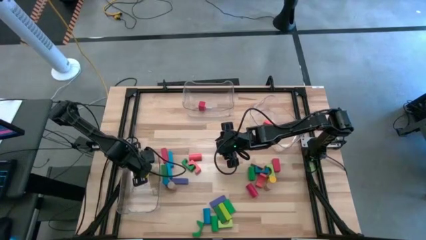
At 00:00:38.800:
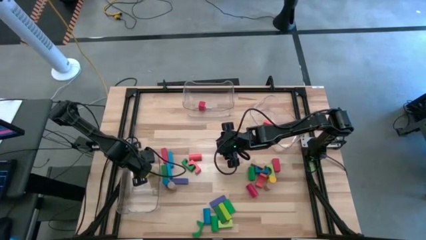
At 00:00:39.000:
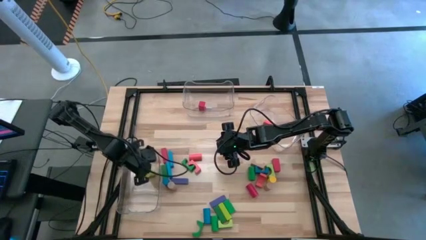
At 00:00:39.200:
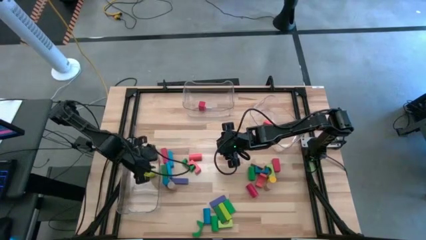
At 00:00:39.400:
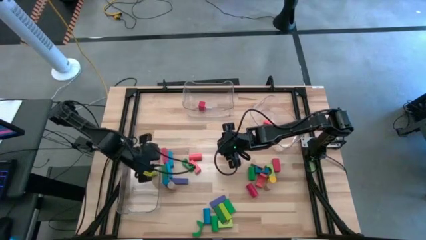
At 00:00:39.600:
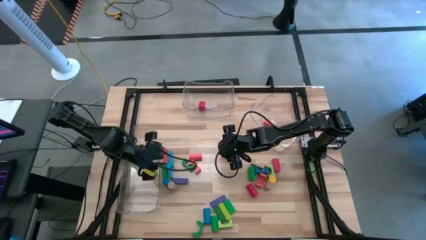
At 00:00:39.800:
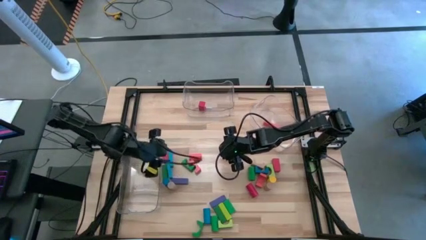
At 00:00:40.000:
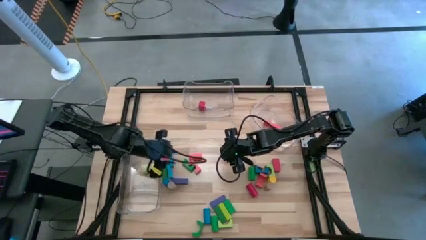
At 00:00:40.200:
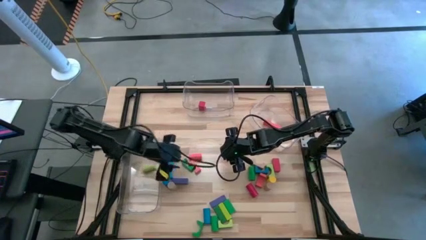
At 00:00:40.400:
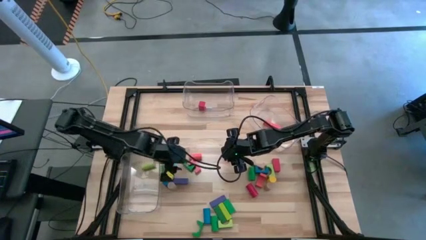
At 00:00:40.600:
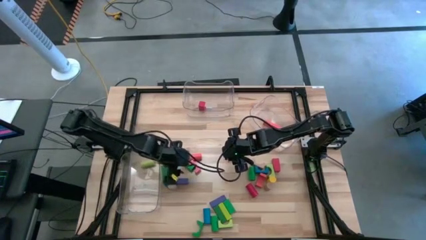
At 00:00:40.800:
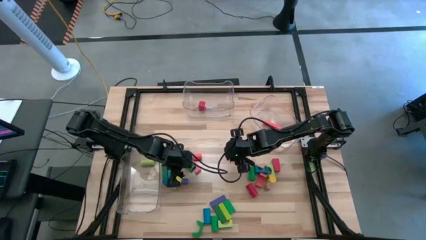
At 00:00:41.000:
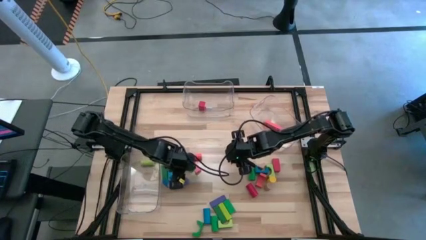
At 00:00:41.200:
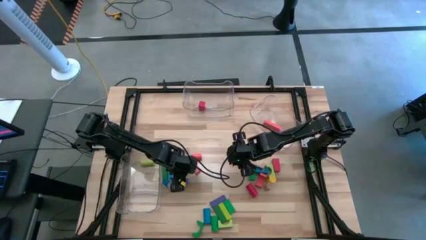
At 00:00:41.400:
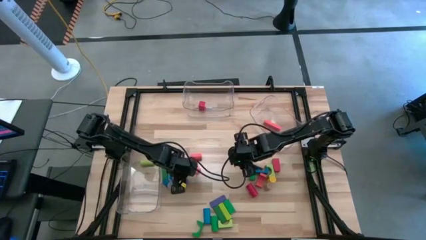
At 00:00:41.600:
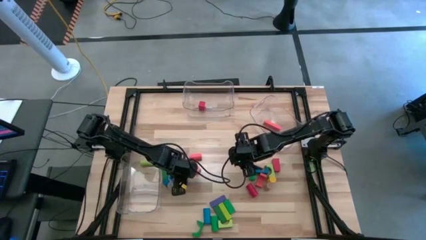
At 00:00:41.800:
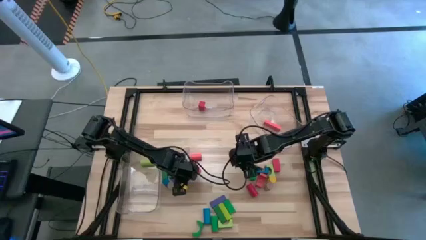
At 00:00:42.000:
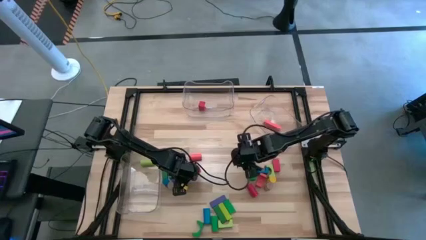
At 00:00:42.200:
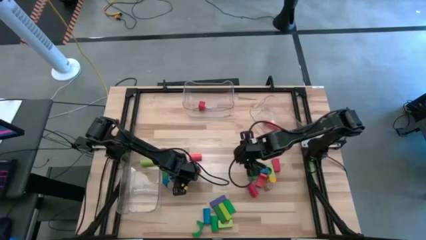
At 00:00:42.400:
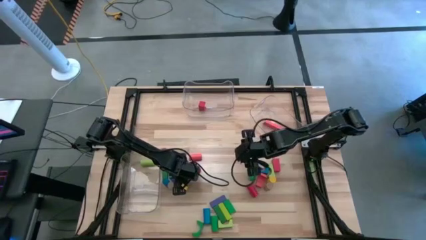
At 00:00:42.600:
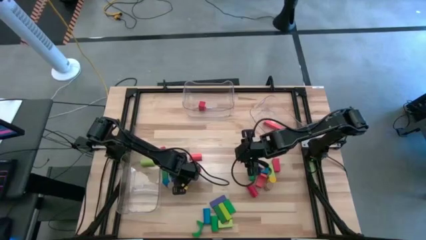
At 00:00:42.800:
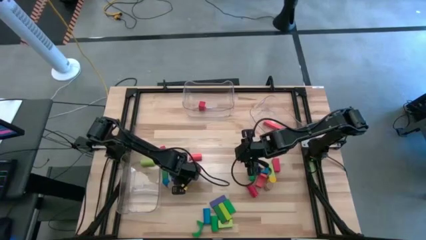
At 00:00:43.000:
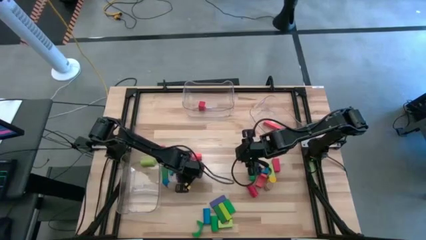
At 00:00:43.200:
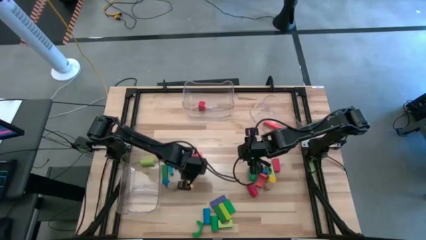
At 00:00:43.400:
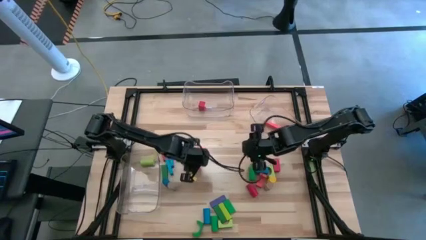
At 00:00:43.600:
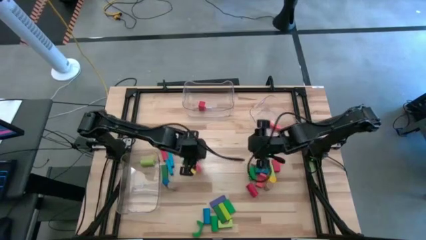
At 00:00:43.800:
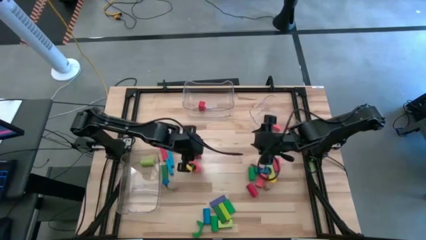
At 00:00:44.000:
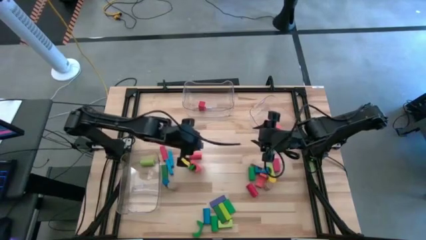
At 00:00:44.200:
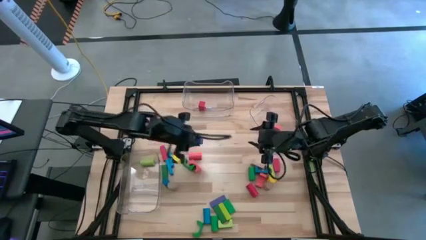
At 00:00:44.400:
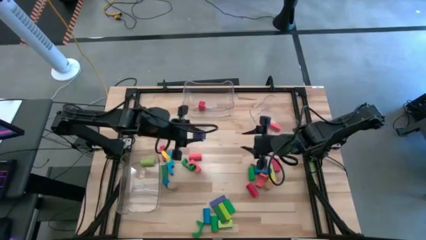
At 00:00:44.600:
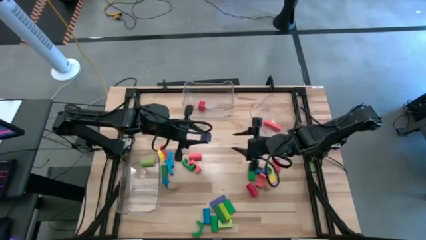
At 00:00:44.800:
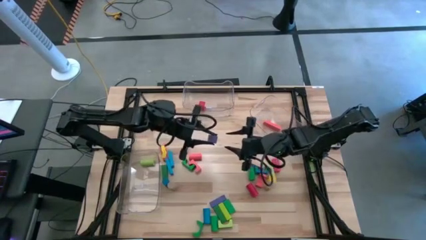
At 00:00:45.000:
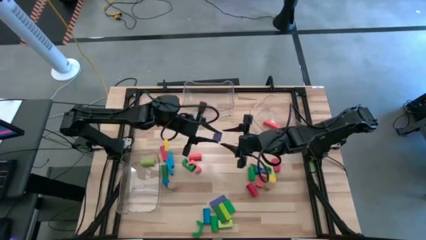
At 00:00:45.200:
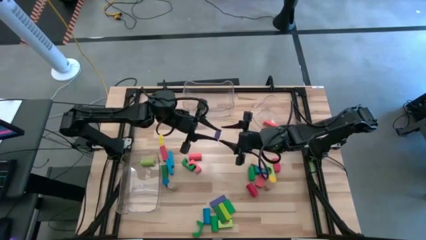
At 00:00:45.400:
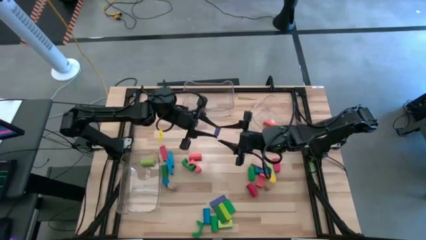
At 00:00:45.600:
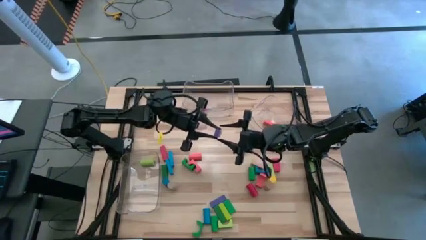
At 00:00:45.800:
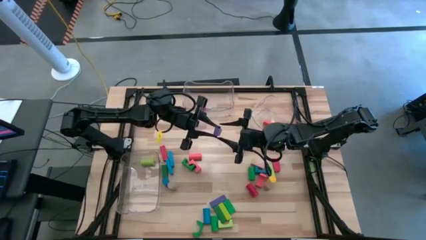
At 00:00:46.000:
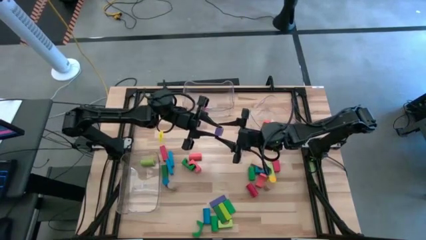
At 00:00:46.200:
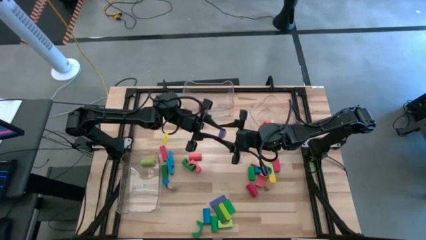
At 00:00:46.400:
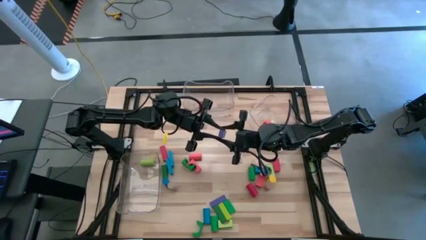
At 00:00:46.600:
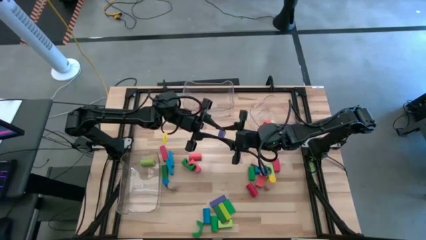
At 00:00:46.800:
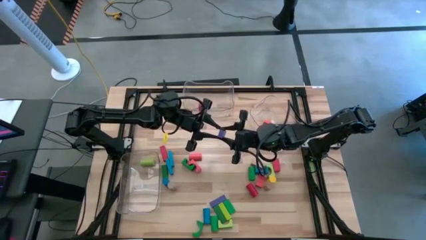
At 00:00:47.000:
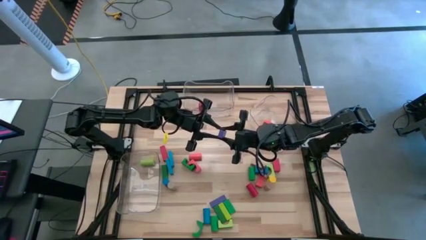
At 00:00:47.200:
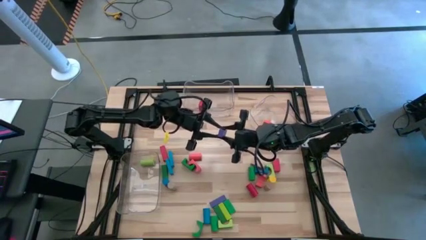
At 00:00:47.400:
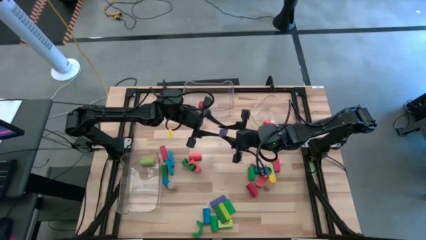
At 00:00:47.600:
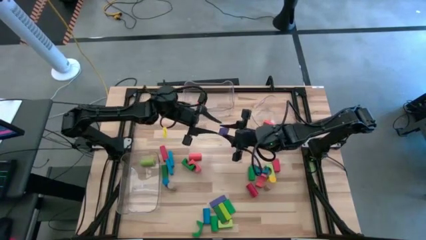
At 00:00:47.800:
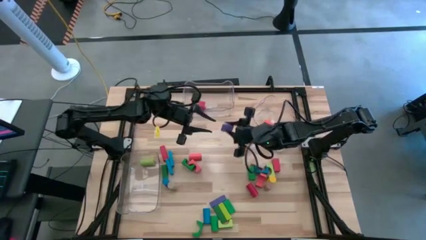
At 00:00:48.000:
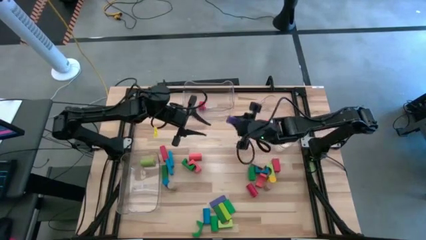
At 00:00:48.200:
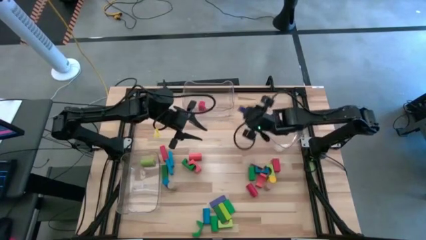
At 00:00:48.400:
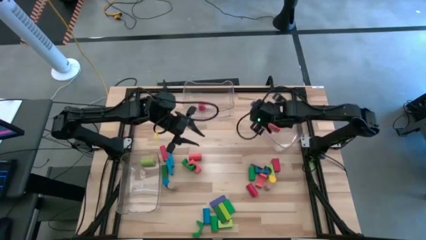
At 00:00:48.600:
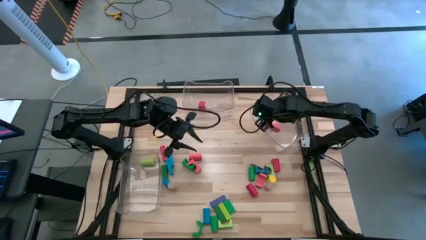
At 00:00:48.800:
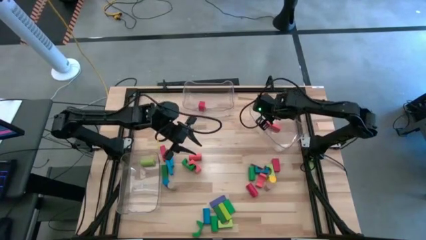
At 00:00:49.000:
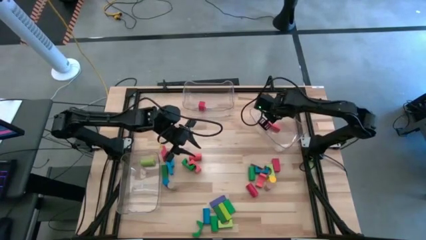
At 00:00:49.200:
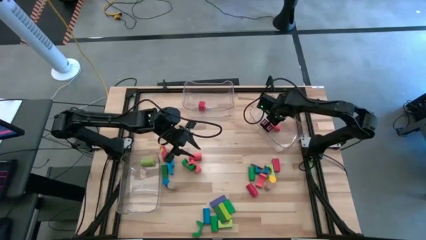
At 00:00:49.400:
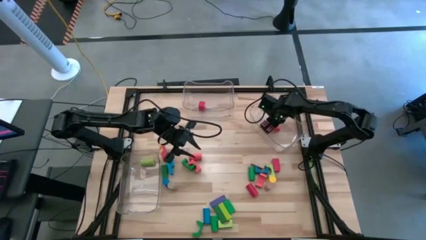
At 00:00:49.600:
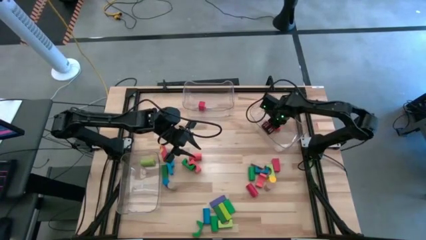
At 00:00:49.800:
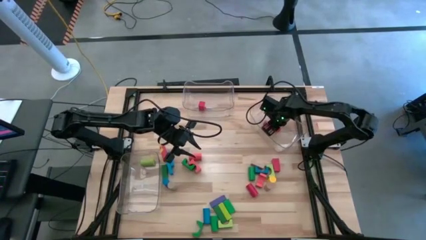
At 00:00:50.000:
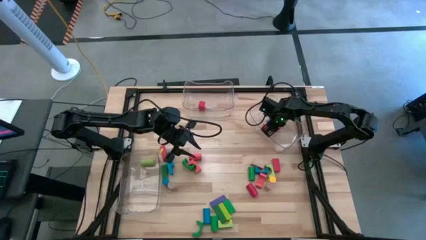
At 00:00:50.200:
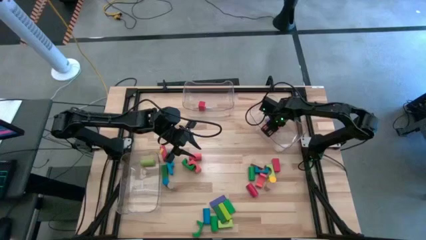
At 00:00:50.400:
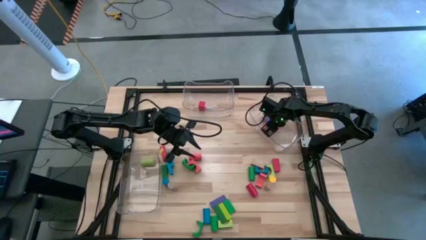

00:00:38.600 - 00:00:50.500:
Task: Sort blocks by size
Put the blue rectangular block into the right transparent bin

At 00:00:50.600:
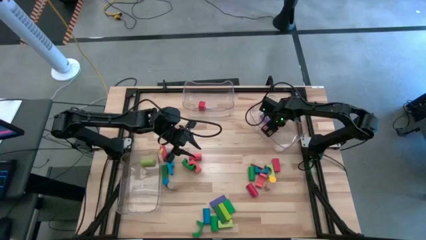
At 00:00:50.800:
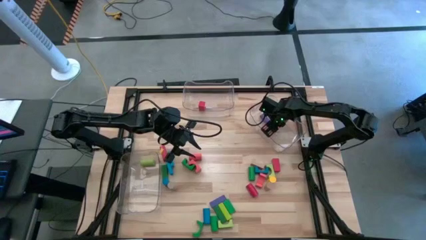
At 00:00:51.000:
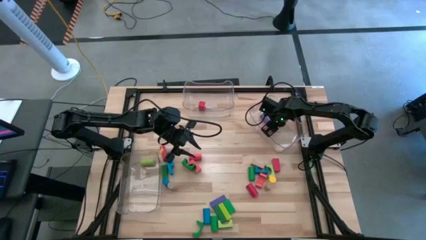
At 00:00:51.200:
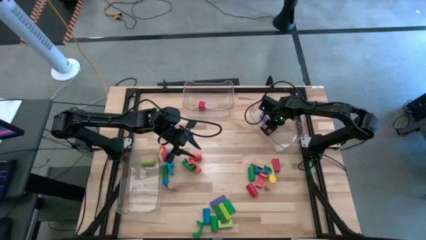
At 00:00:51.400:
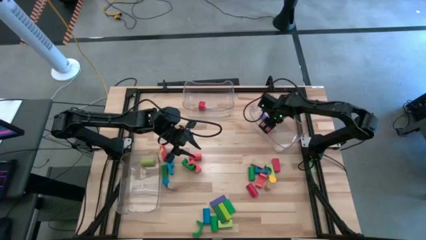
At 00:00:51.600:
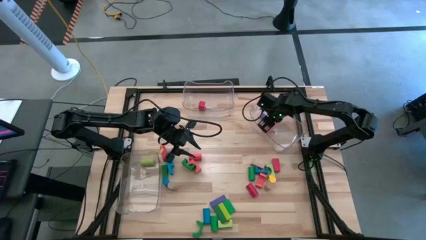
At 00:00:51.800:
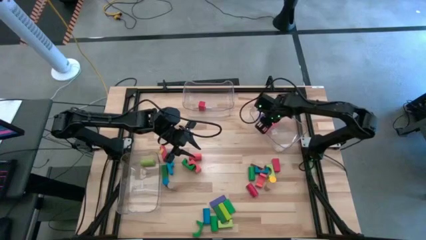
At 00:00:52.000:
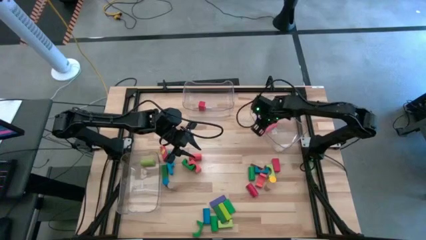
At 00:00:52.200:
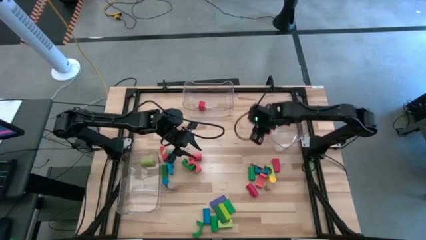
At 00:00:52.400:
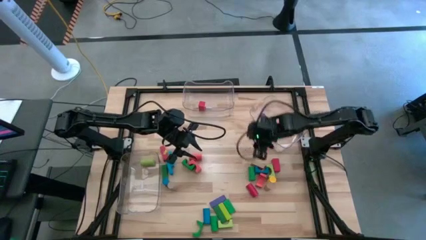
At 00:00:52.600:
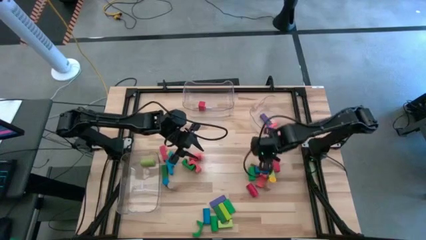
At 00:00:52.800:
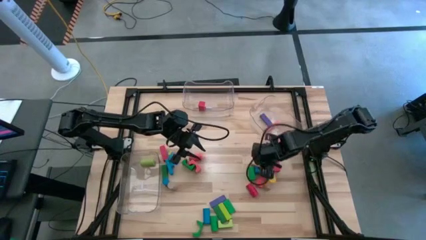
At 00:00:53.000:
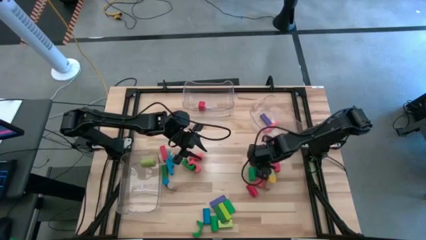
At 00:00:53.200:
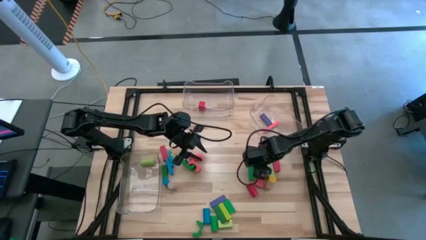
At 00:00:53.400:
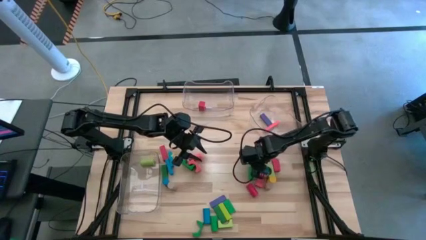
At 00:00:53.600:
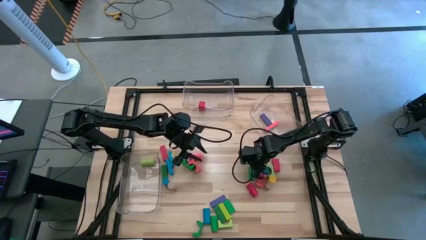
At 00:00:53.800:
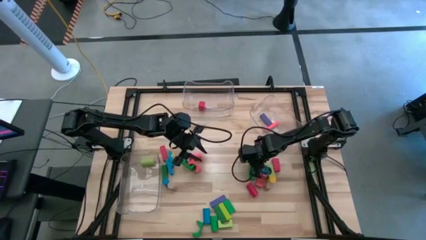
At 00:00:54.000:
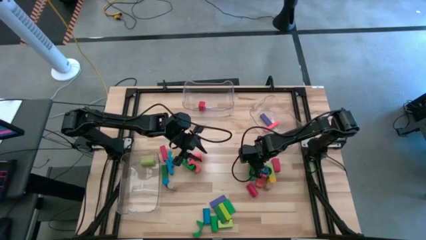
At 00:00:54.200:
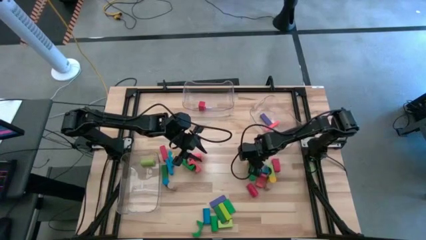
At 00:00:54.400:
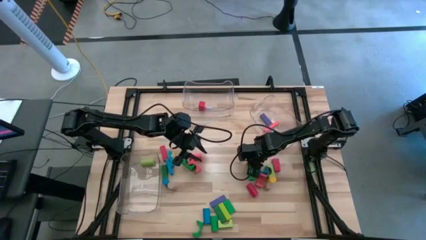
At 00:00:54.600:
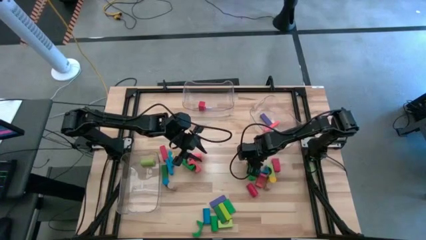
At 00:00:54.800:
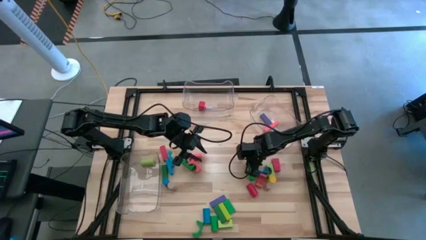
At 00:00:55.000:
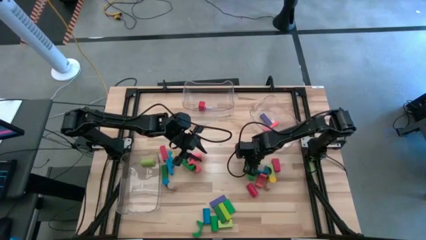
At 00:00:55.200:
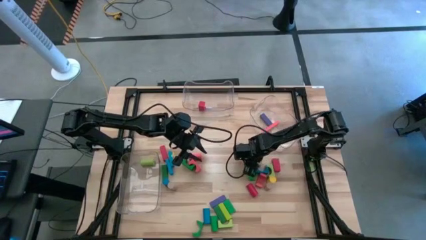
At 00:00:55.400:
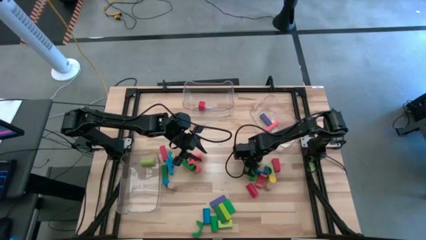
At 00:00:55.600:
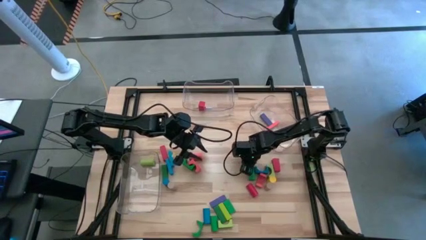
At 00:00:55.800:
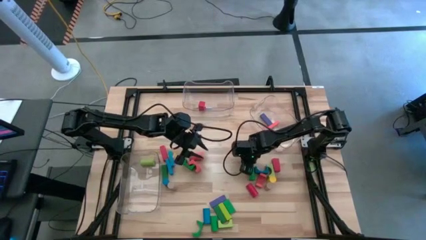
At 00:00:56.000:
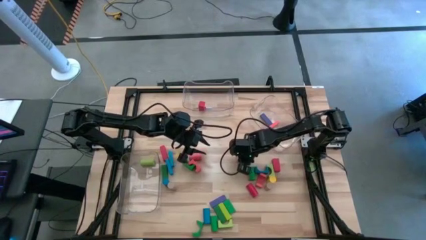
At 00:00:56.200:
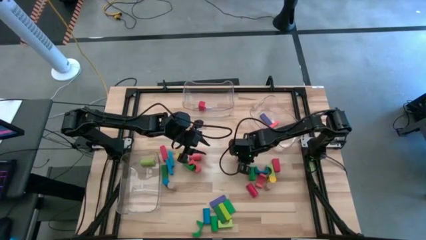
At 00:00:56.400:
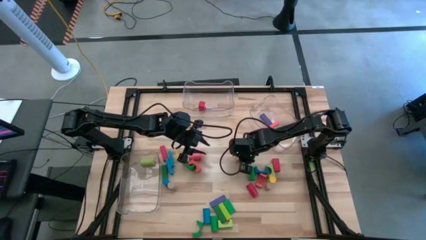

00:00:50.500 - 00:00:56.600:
Put the brown arch block into the middle transparent bin
